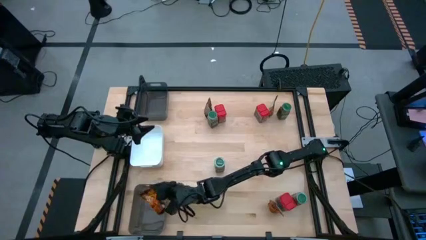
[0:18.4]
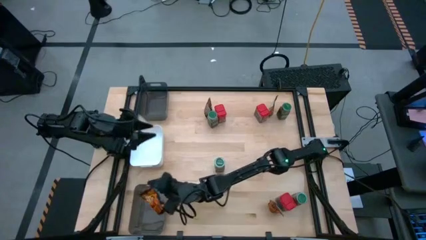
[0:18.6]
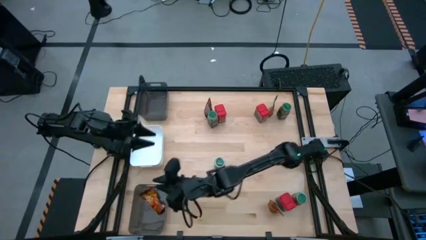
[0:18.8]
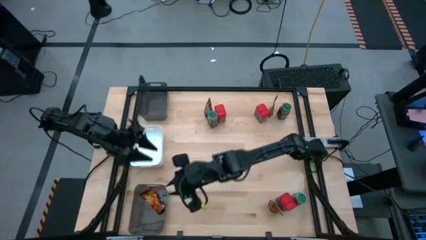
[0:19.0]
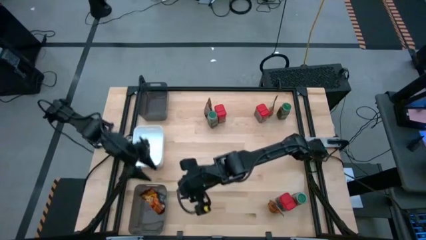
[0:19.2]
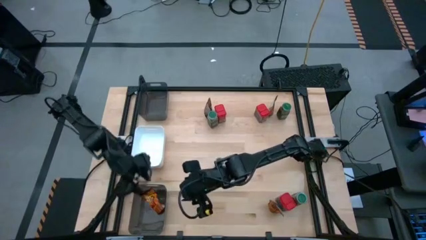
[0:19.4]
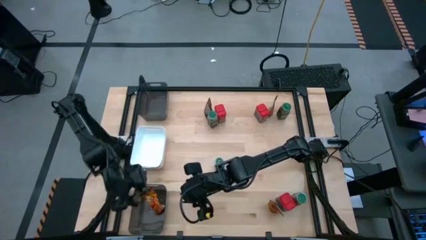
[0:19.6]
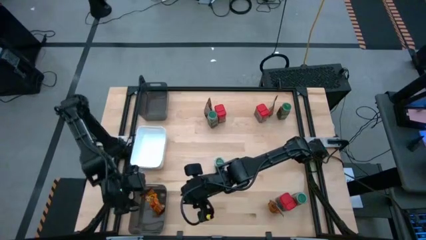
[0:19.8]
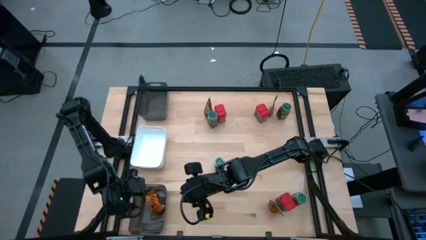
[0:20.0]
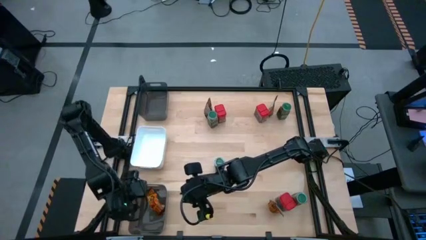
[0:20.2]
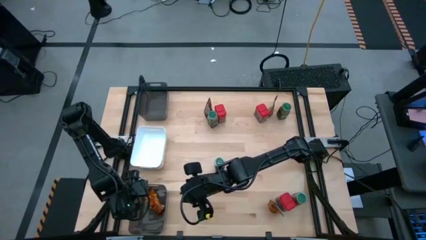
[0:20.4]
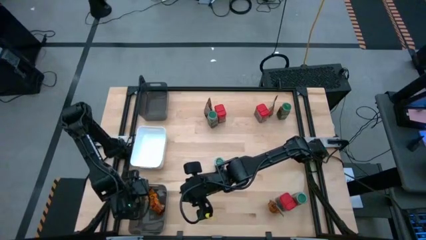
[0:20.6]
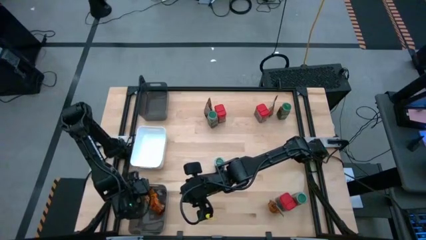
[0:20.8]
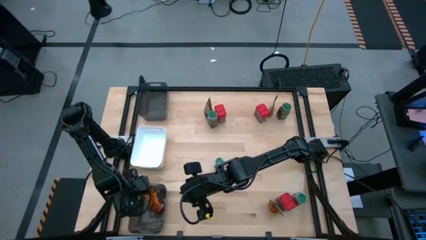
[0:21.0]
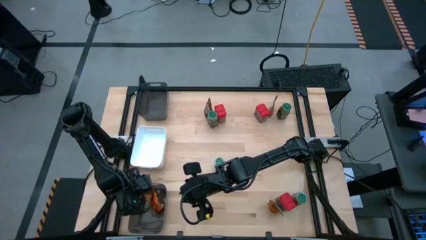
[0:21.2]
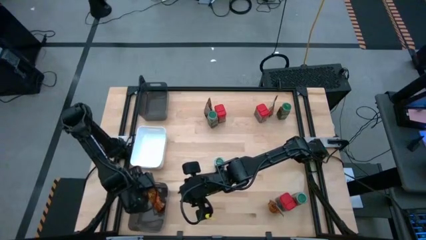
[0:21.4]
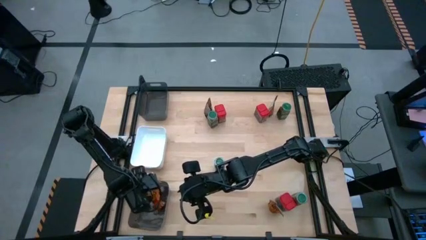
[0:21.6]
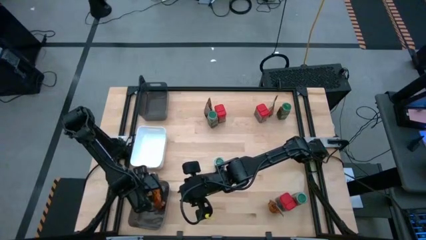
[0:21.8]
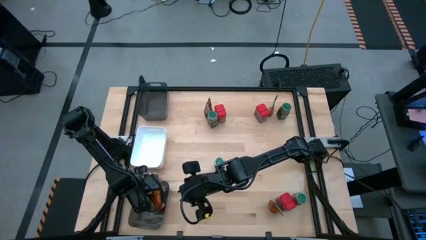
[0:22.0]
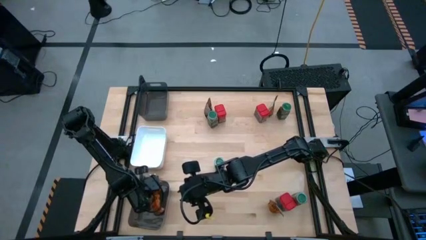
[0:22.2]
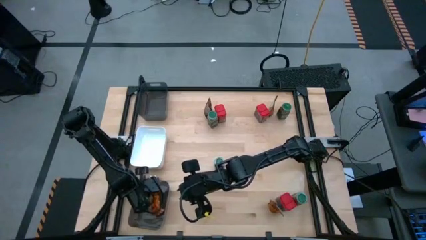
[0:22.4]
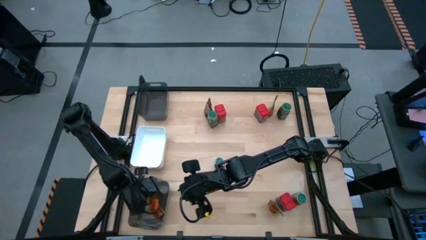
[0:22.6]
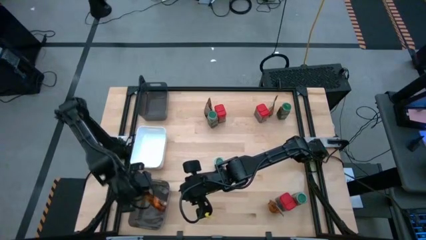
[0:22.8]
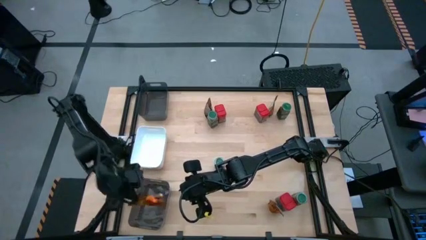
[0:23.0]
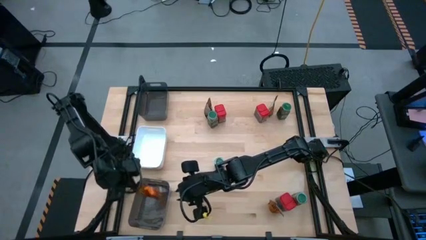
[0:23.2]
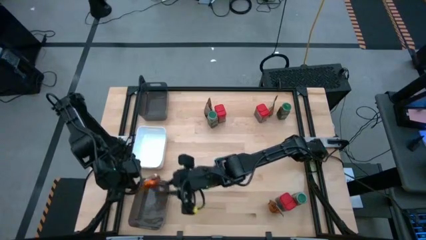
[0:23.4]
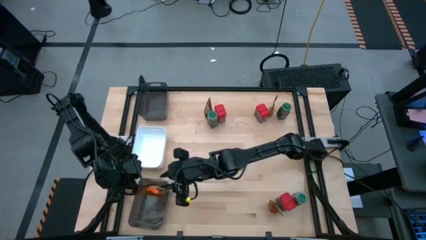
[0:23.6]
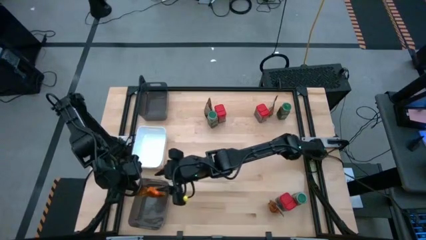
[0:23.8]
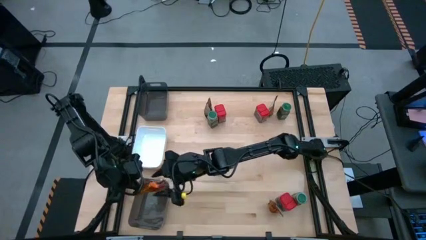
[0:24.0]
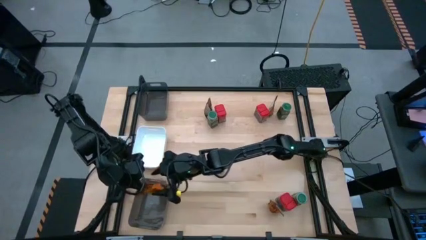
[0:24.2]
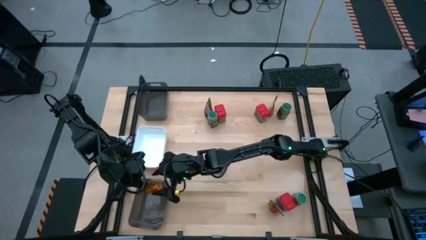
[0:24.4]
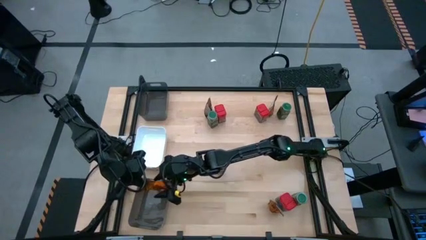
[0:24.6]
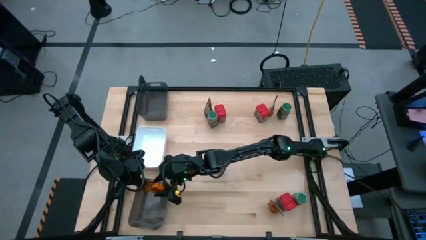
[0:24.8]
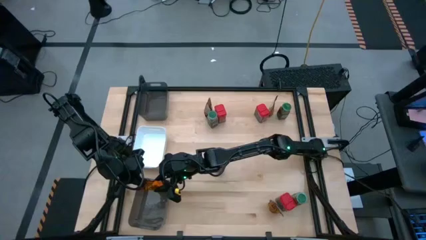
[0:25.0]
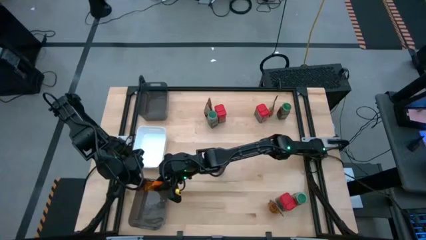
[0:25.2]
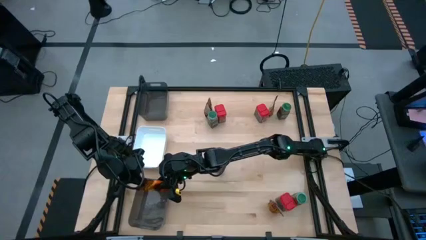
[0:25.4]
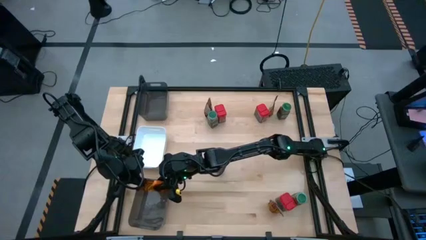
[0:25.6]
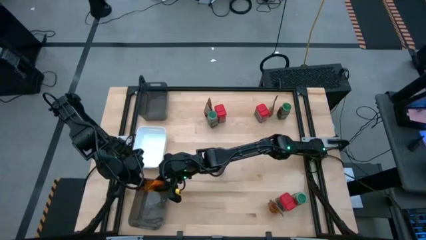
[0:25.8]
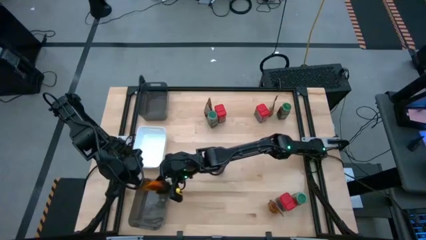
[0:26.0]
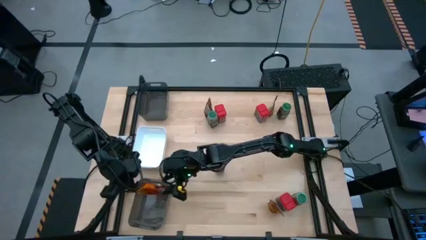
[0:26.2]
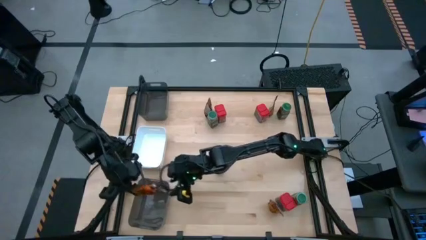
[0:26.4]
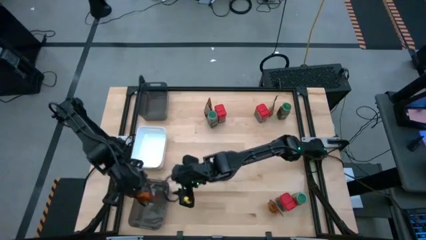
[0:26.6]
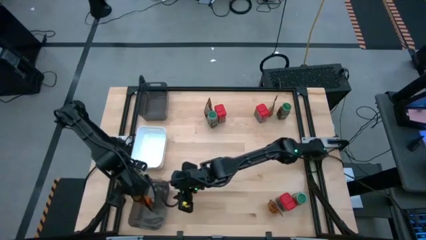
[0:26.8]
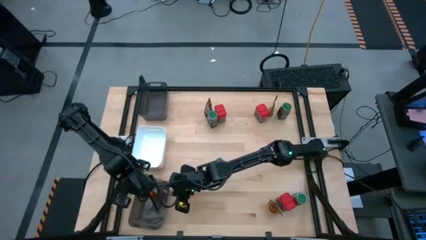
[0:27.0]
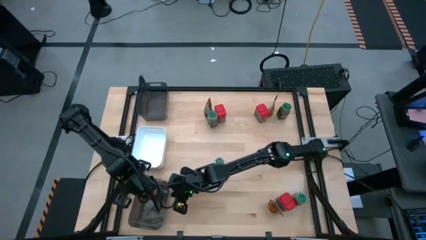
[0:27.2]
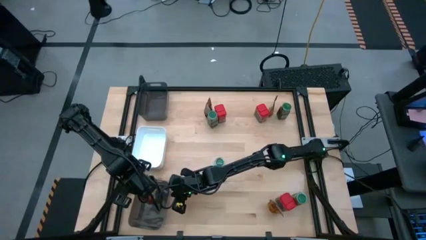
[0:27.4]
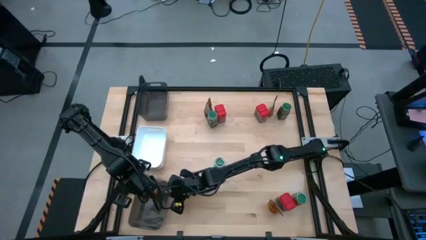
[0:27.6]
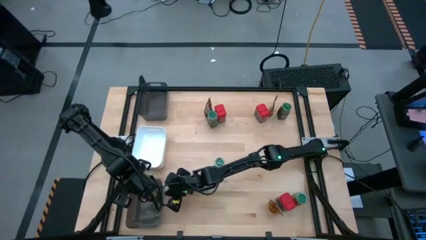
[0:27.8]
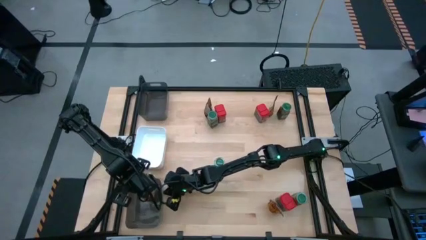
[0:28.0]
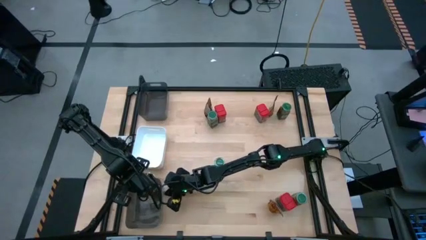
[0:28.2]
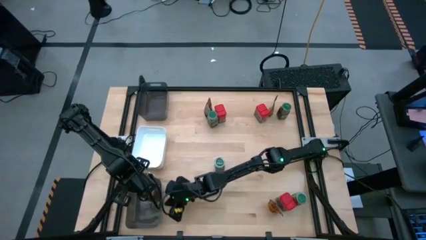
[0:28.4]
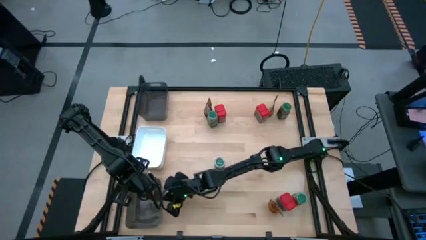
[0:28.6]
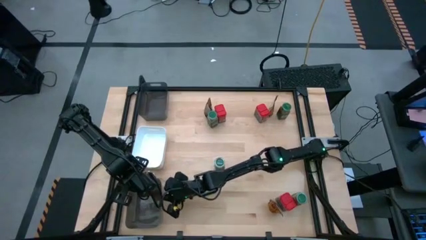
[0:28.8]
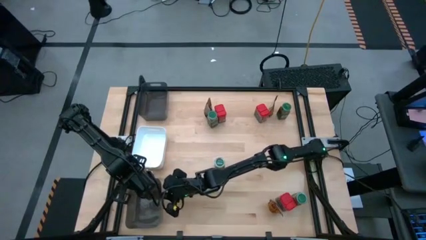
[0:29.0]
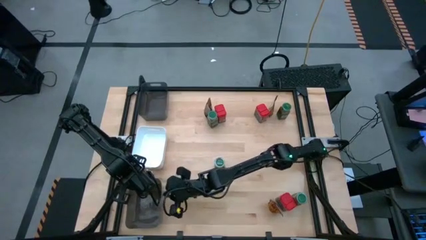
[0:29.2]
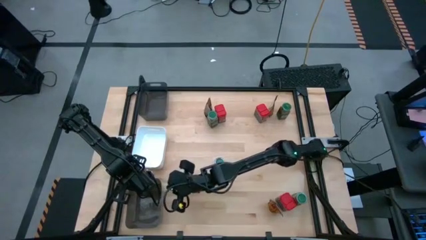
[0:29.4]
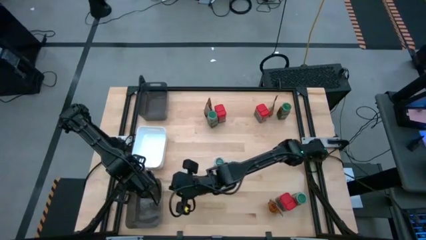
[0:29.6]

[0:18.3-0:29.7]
Task: Sort spices by type
Put the orange seasoning bag into the bottom black bin

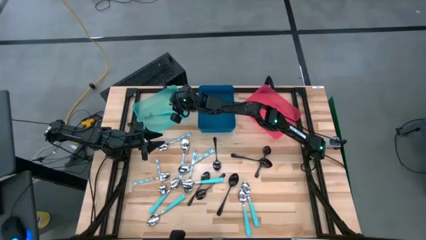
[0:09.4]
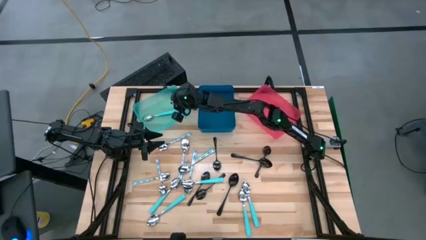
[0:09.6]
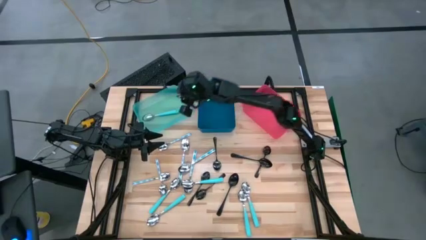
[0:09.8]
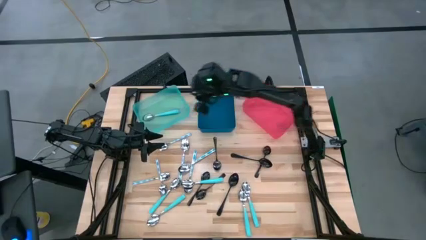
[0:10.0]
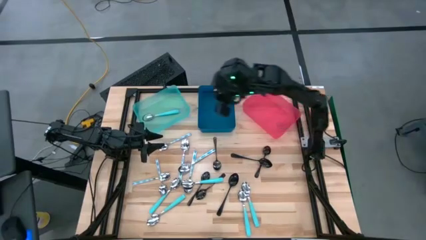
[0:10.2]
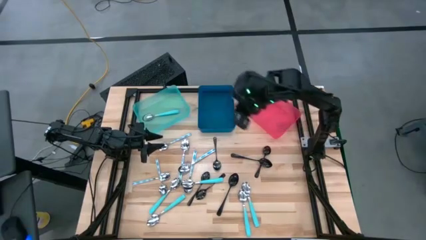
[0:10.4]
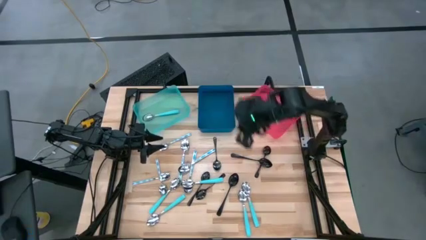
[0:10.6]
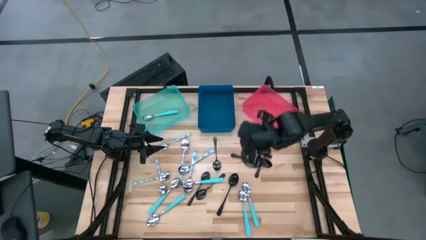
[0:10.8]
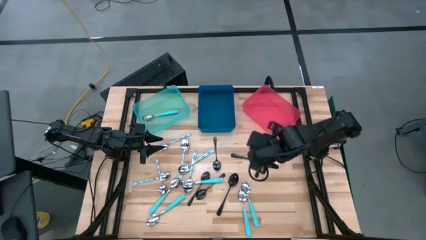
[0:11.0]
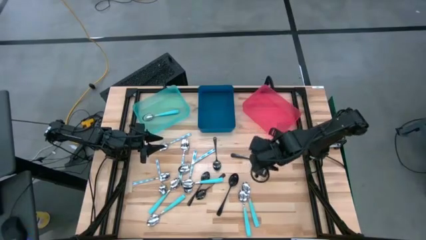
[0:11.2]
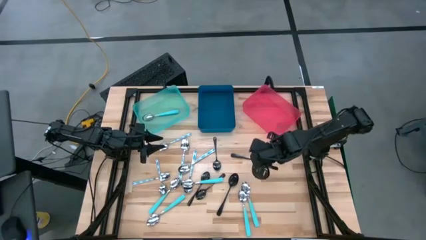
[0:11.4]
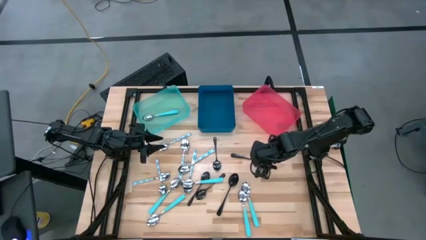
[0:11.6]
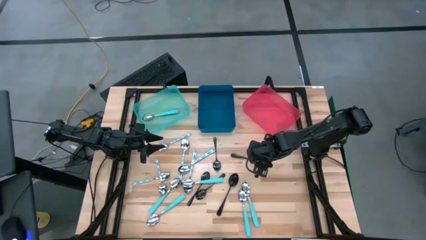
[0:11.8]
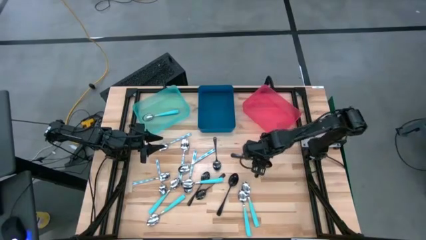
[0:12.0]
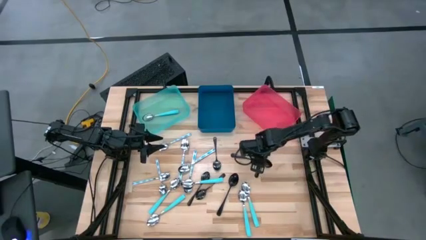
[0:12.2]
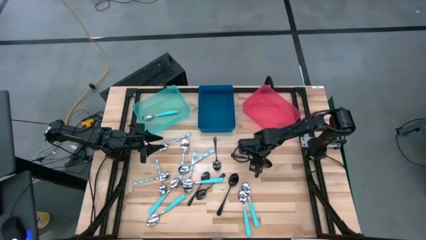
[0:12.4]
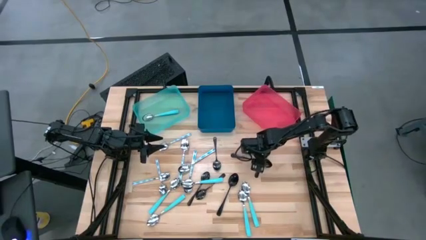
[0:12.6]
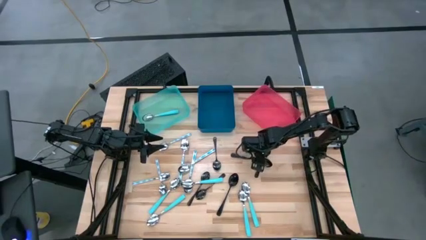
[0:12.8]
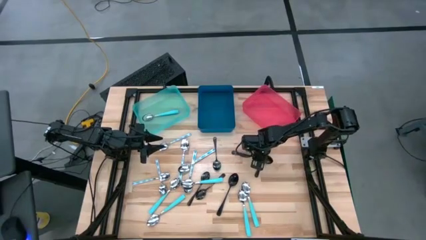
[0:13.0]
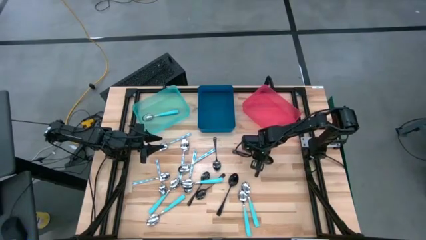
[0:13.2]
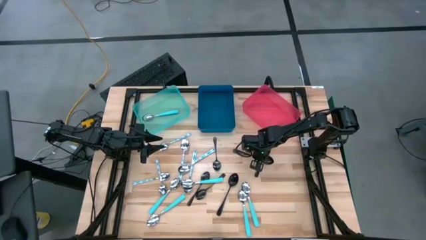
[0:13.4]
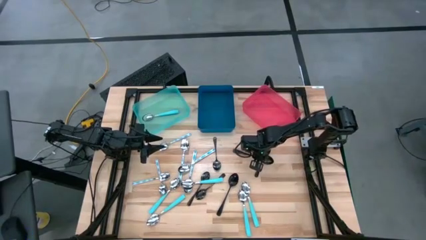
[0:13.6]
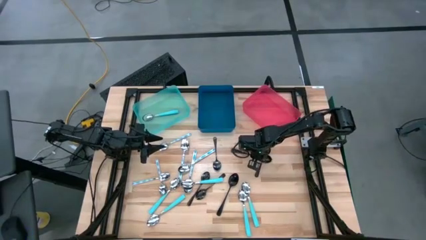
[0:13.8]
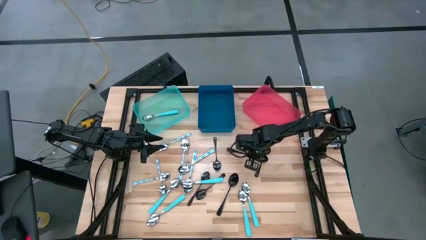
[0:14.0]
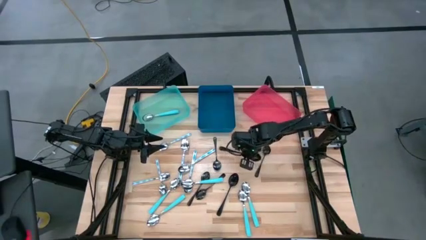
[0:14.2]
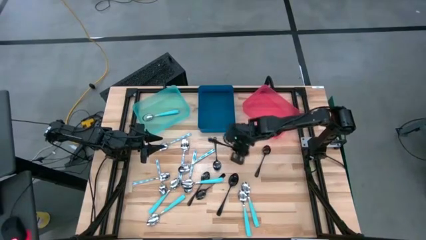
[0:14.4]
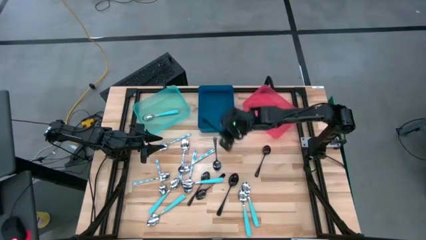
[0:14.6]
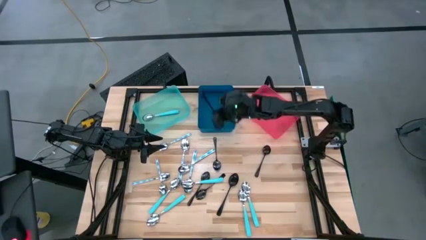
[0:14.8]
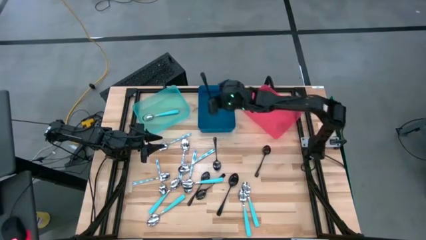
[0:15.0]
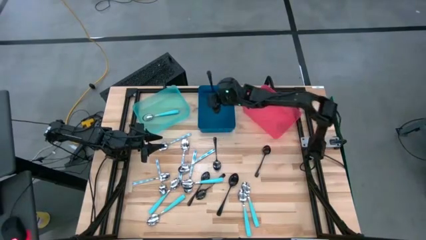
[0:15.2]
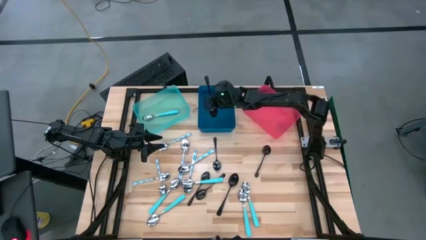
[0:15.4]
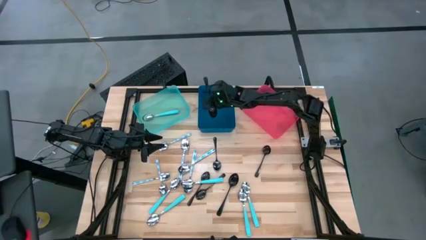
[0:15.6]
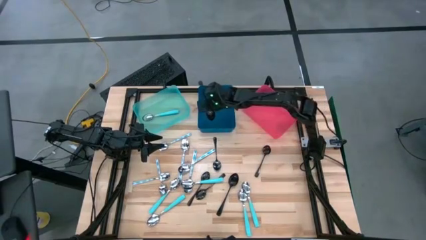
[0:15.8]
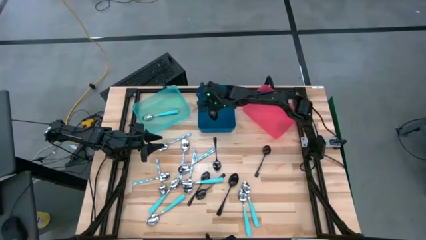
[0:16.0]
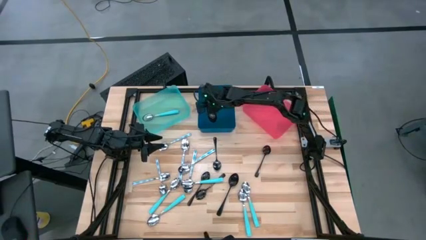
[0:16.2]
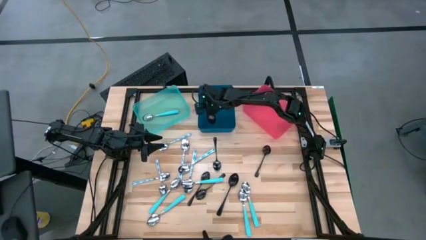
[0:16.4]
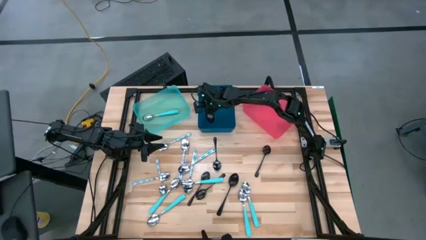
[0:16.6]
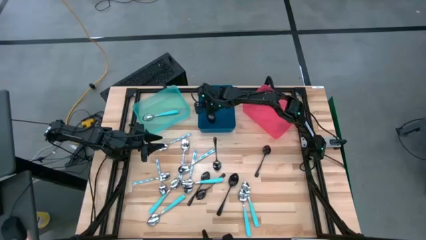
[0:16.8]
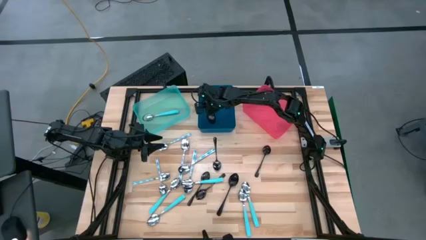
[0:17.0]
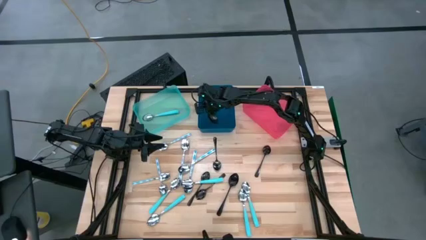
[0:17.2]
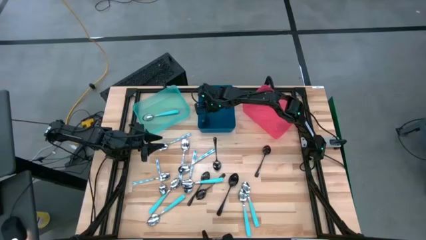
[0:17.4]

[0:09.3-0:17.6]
Task: Sort silverware by color (type)
Put the black spoon into the blue bin
